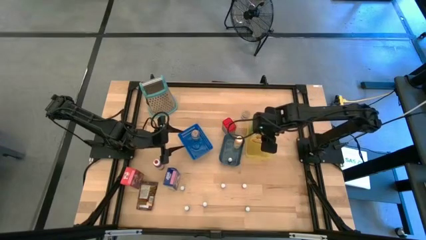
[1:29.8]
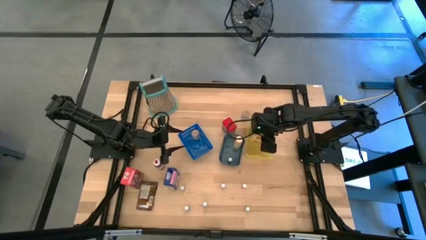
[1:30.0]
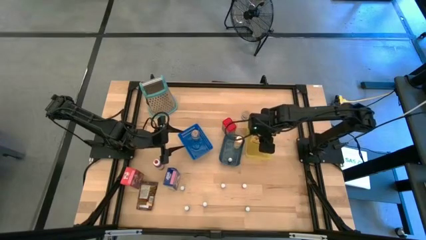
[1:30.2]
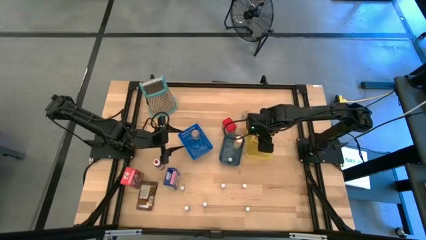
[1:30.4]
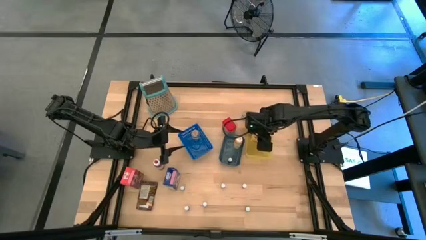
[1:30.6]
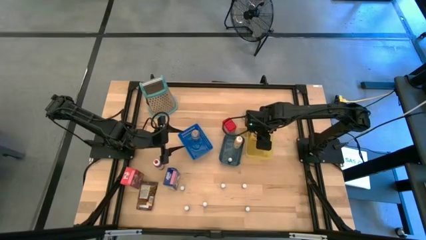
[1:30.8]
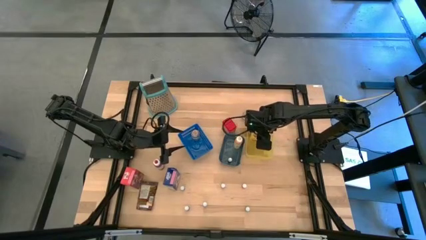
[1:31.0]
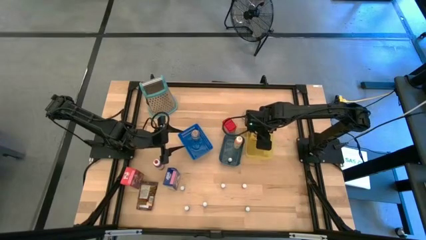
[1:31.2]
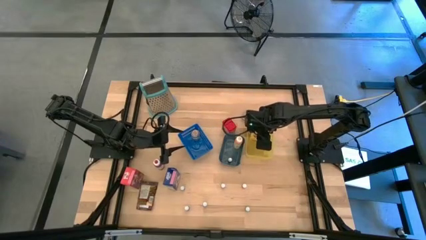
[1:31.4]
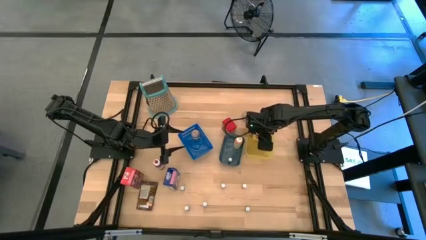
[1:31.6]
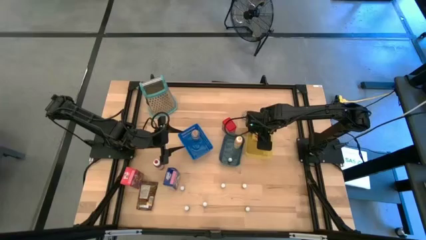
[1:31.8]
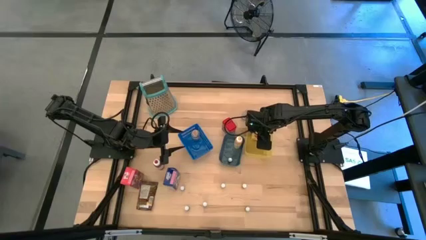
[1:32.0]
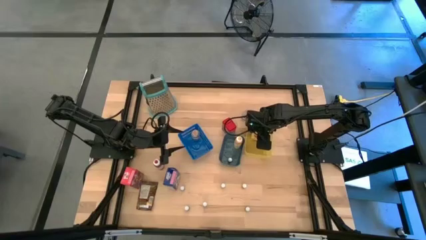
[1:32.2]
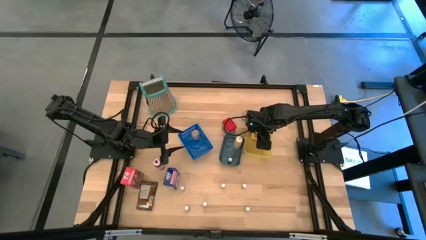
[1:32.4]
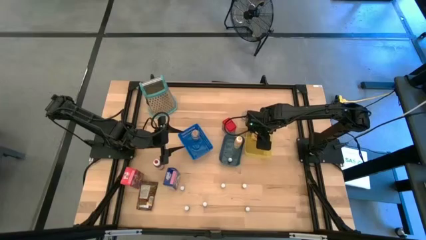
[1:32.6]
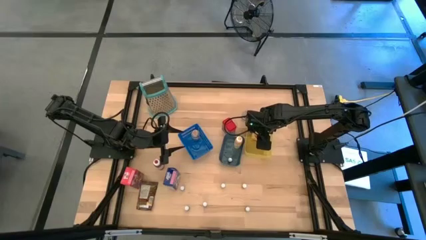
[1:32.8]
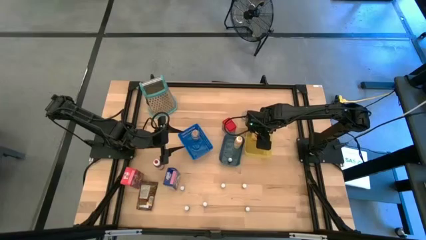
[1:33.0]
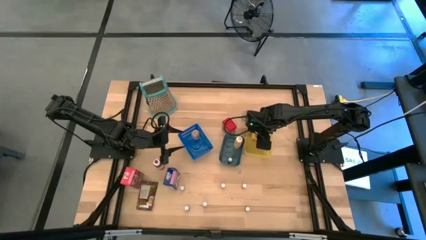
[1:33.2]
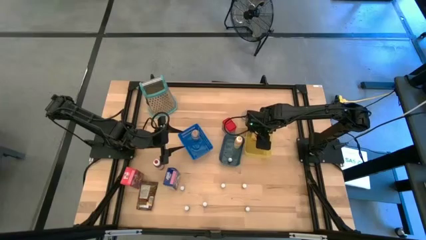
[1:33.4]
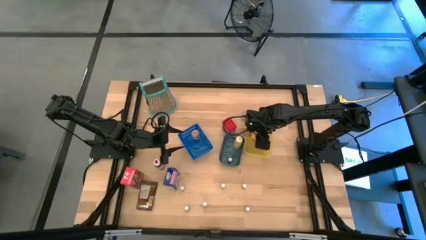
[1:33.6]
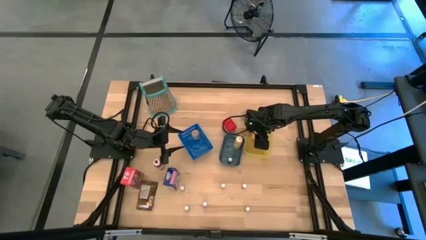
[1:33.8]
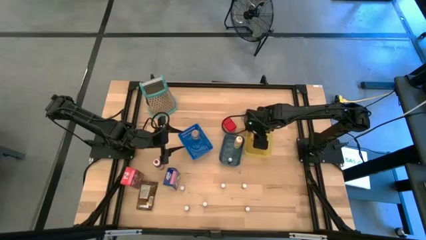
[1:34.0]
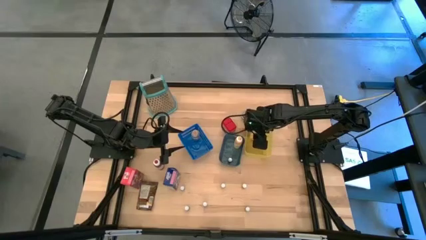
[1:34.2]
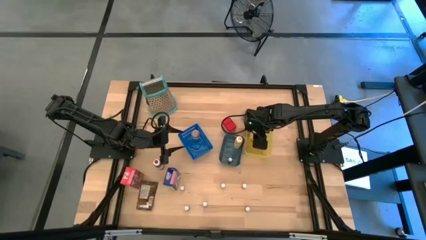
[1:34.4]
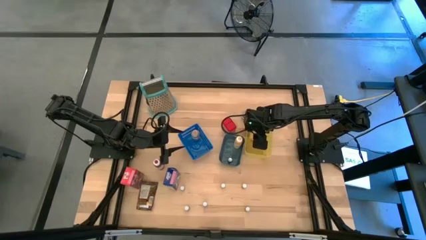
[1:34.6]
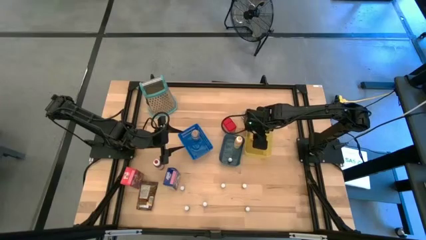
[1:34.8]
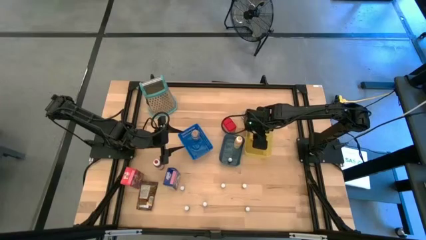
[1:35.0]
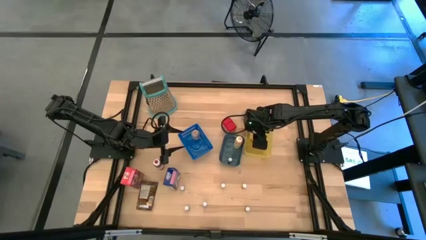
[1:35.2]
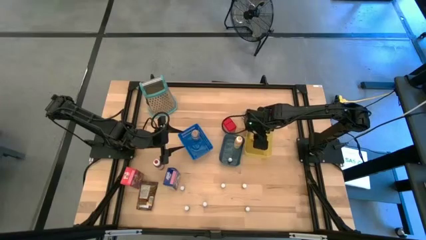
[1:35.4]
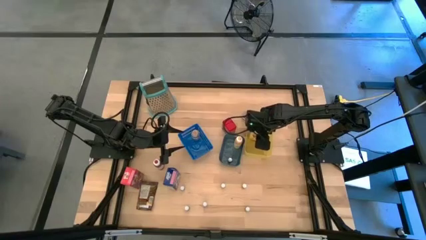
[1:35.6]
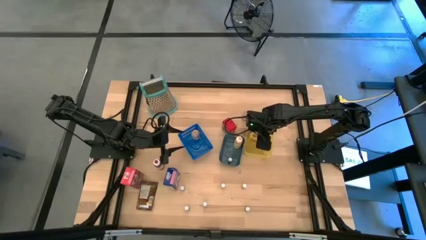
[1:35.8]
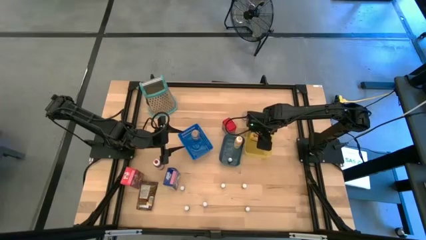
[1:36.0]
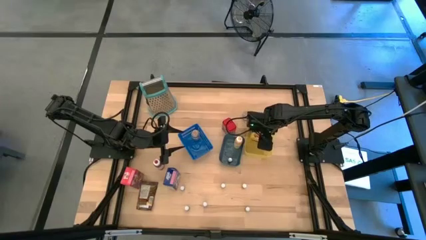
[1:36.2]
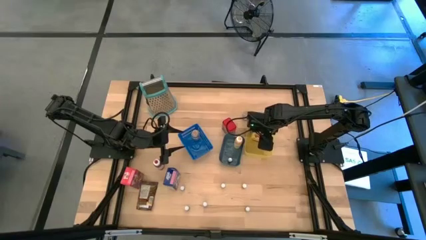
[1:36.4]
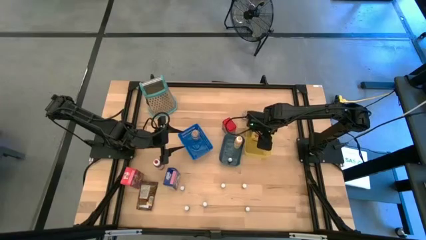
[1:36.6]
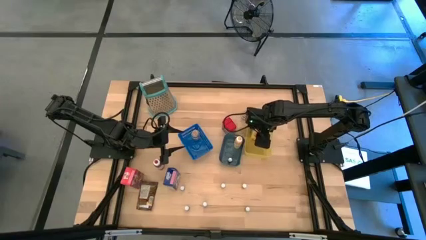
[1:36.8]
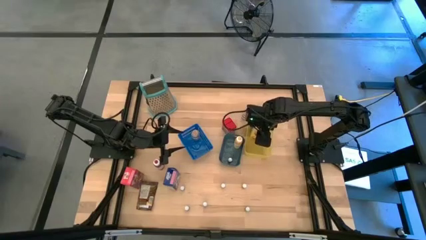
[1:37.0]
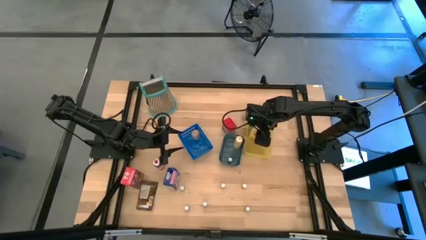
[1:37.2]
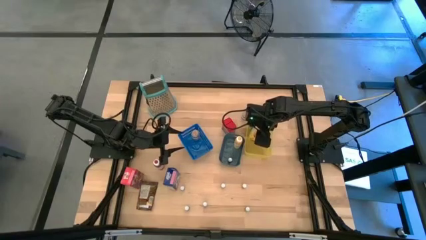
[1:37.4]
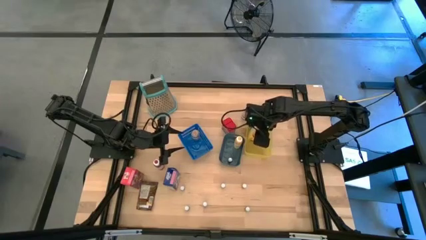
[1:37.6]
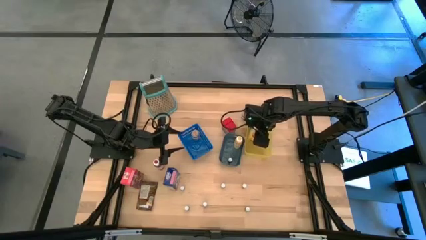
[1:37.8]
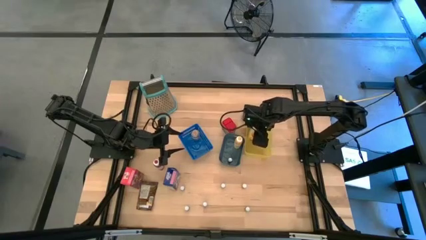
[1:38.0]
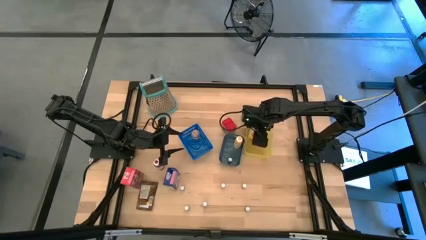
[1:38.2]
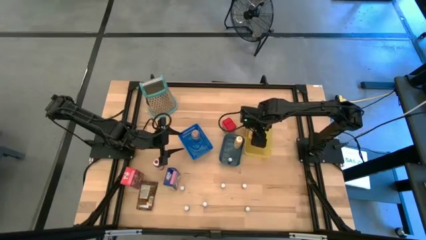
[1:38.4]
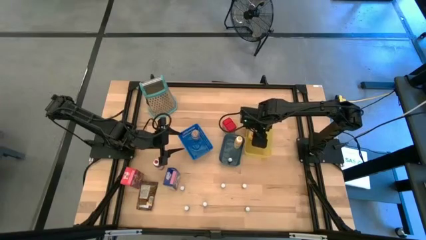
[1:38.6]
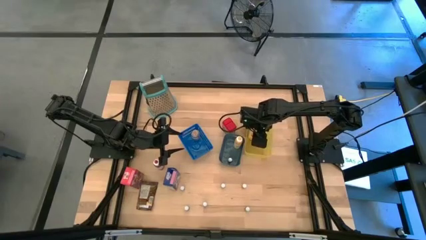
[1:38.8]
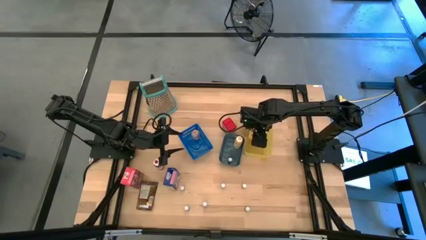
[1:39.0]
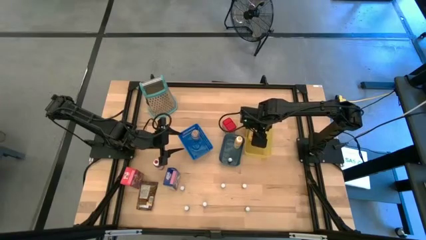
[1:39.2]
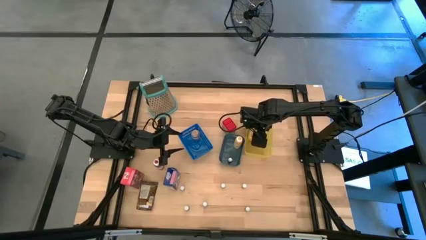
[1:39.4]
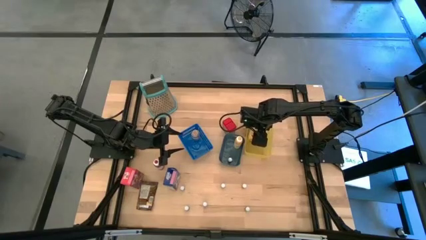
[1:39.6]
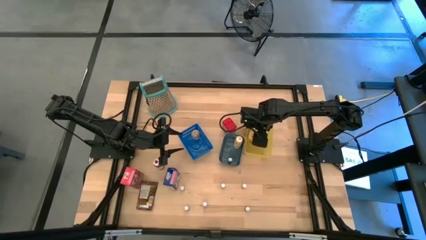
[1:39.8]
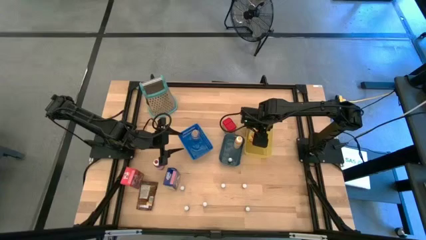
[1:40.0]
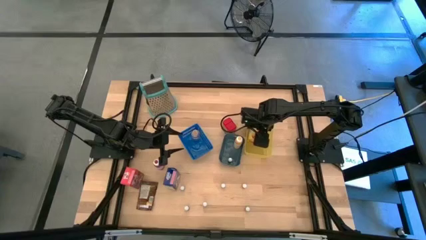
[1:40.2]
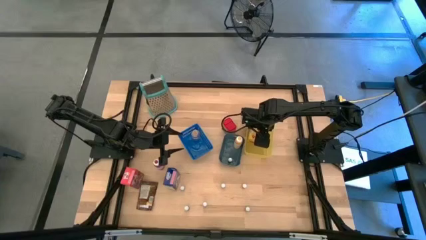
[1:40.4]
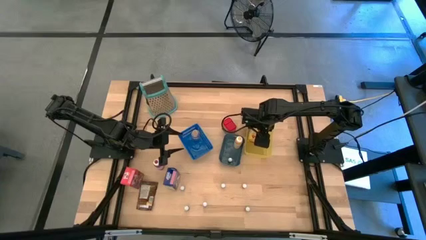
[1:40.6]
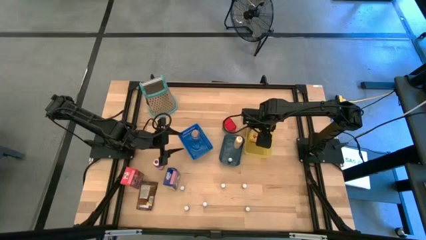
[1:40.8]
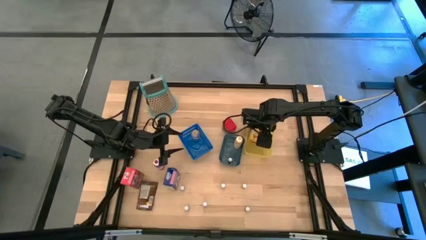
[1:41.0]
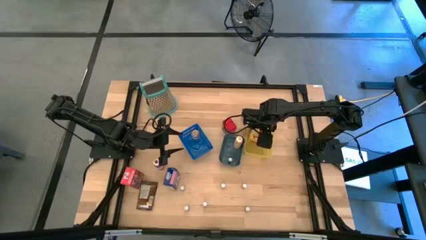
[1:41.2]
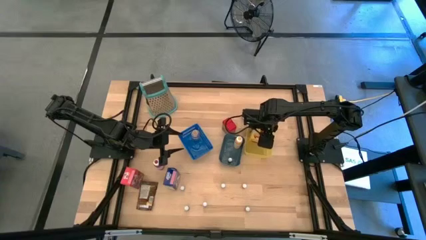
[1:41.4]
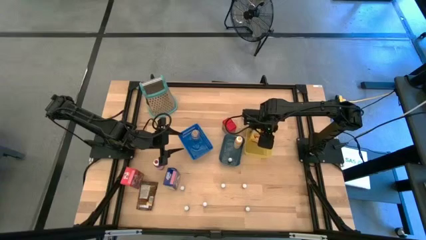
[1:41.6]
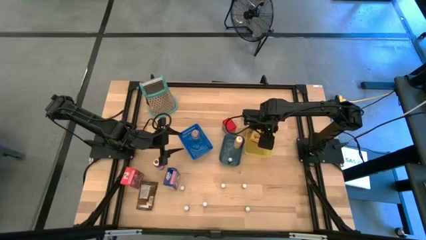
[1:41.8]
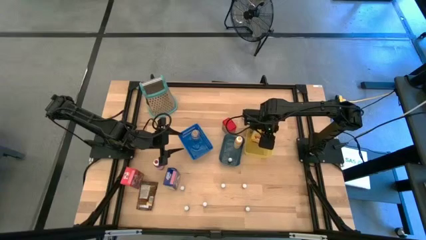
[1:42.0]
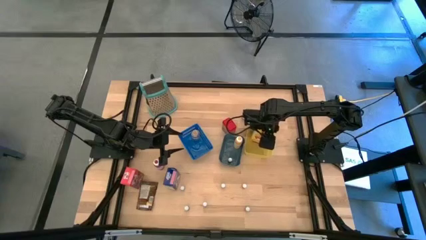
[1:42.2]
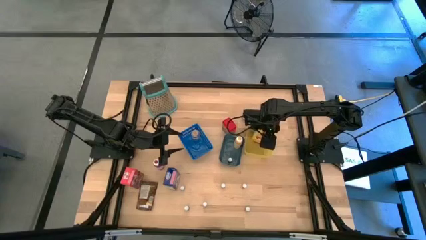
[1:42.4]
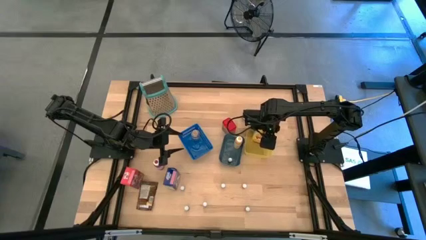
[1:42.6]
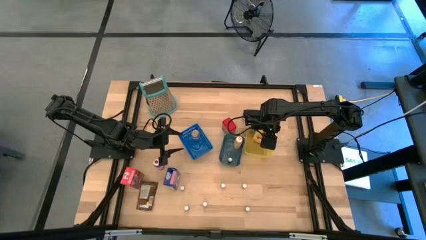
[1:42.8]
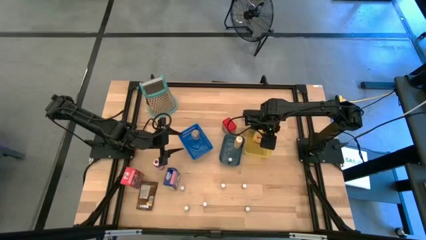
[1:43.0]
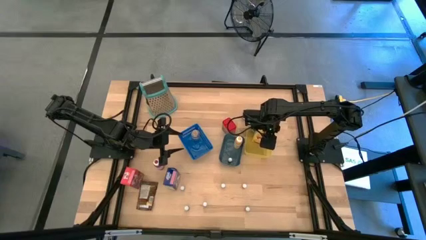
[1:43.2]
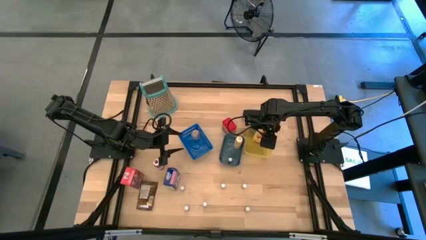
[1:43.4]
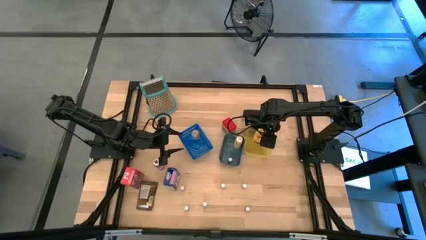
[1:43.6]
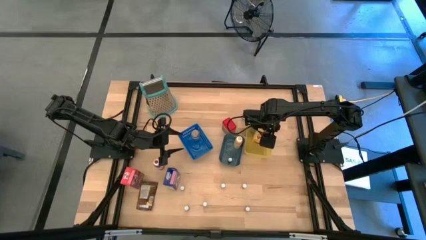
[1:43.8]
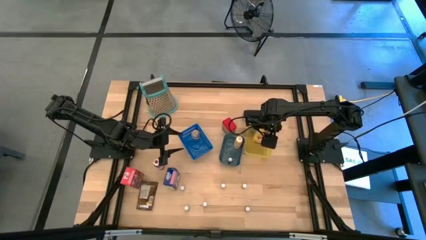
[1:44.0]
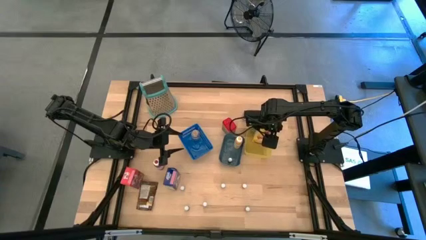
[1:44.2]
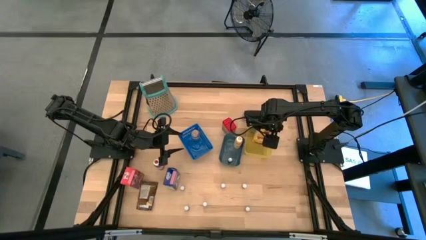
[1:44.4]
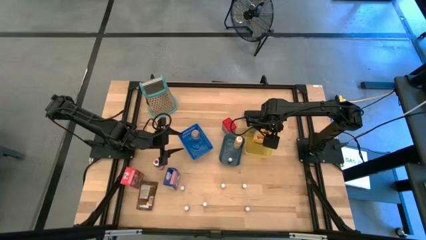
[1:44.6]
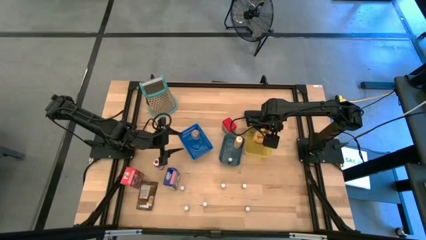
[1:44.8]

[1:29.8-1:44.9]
Task: Pick & Place Kitchen Items
Put the yellow cereal box into the yellow bin
